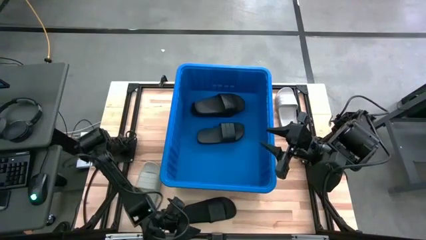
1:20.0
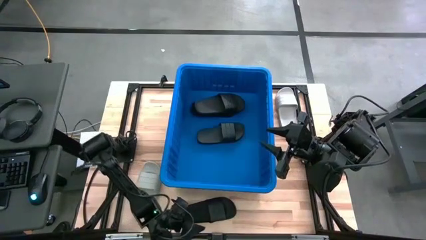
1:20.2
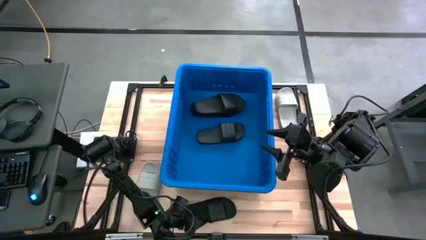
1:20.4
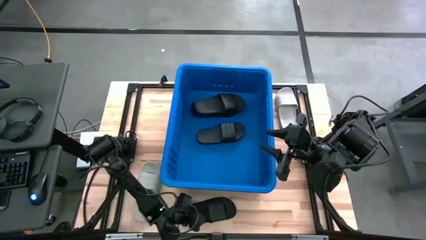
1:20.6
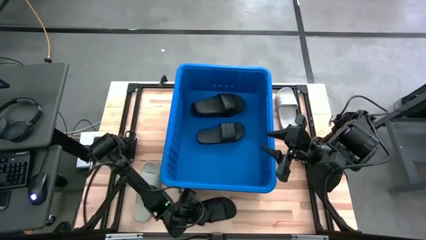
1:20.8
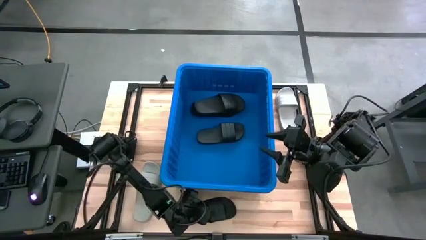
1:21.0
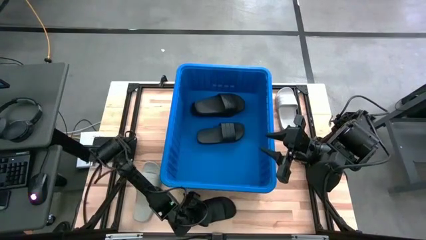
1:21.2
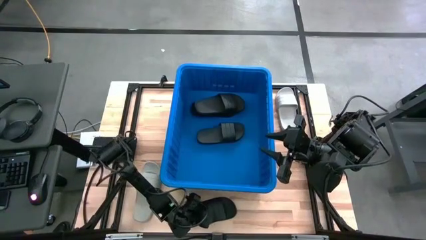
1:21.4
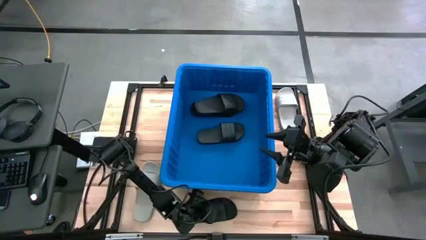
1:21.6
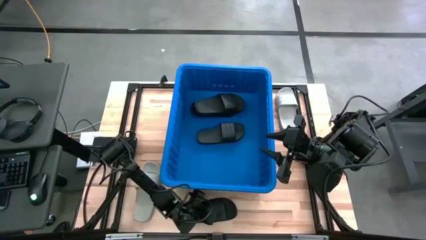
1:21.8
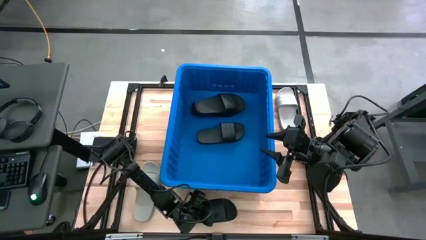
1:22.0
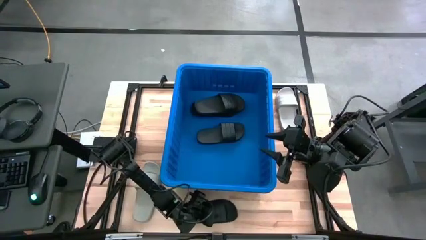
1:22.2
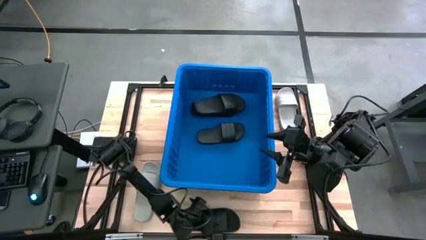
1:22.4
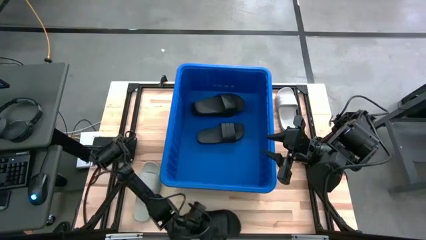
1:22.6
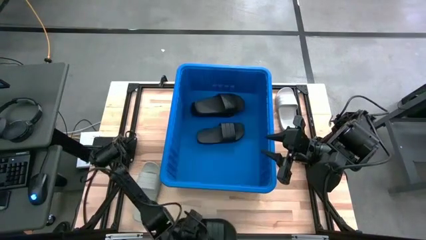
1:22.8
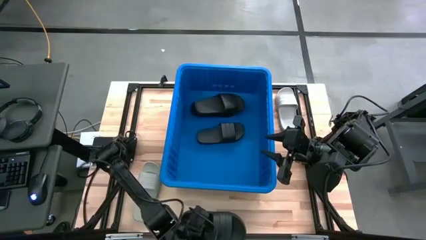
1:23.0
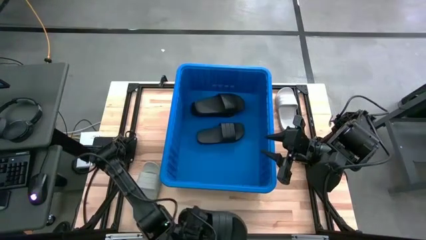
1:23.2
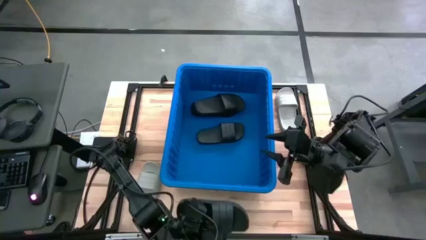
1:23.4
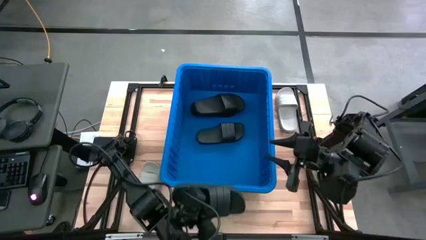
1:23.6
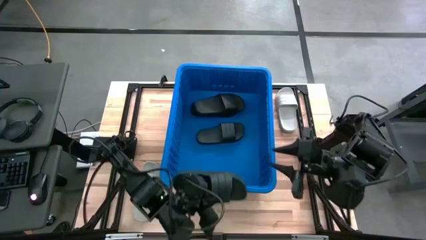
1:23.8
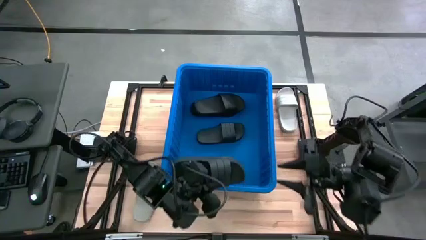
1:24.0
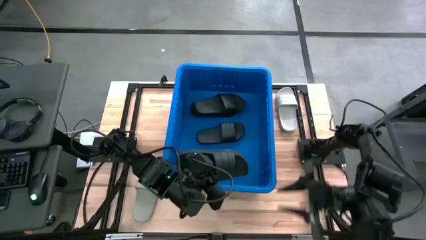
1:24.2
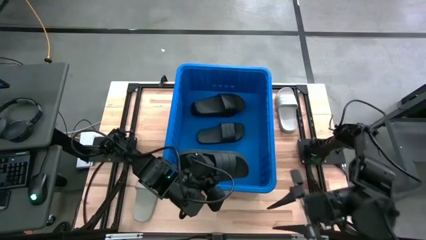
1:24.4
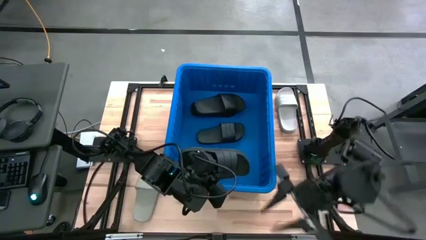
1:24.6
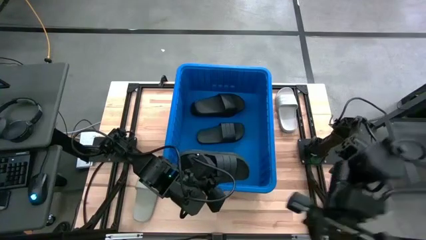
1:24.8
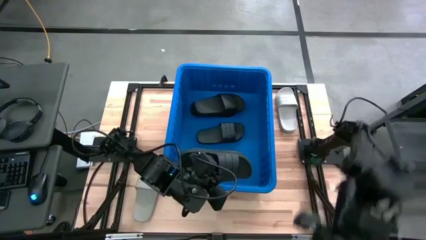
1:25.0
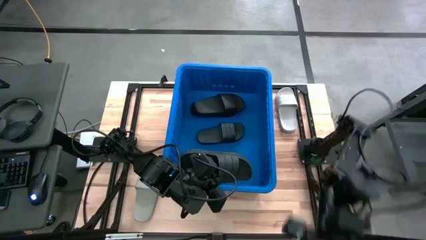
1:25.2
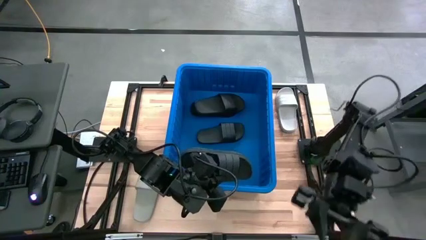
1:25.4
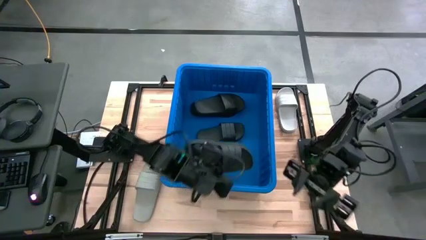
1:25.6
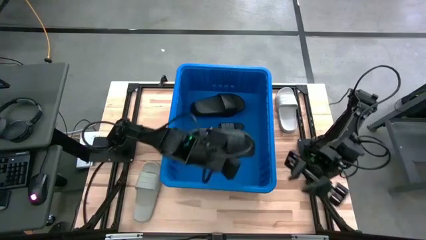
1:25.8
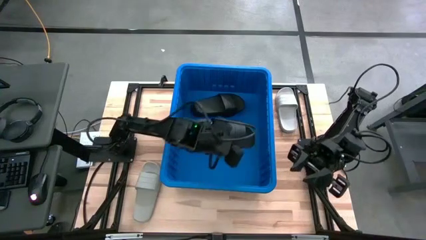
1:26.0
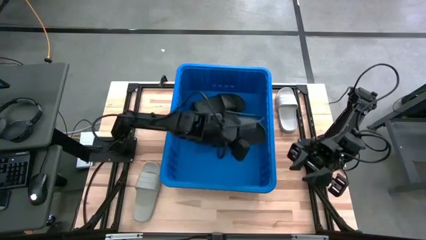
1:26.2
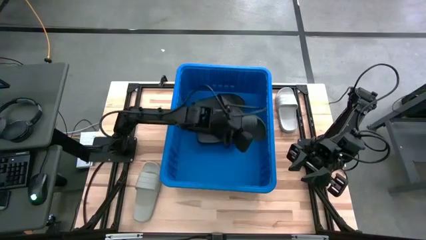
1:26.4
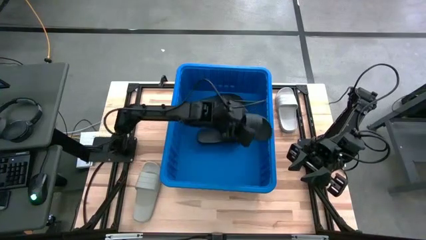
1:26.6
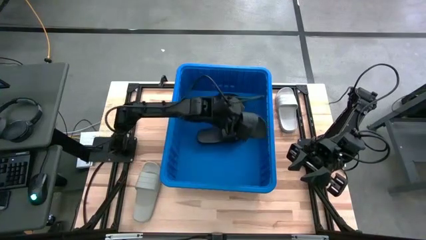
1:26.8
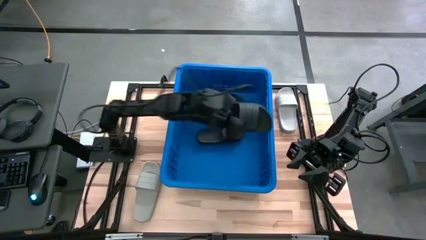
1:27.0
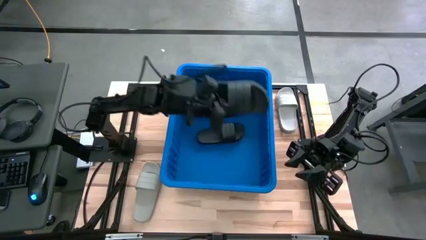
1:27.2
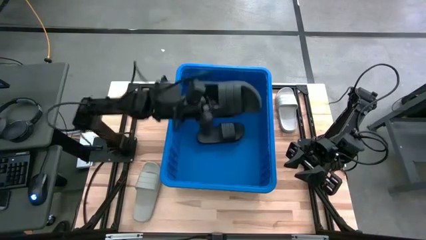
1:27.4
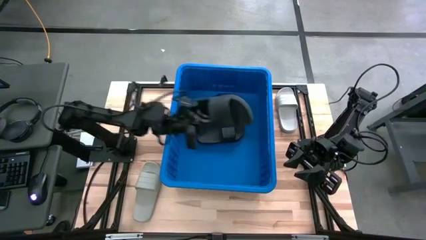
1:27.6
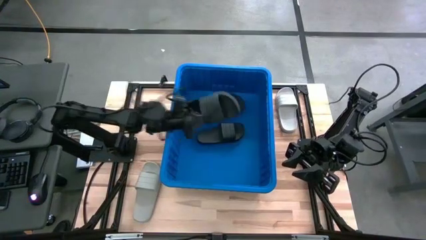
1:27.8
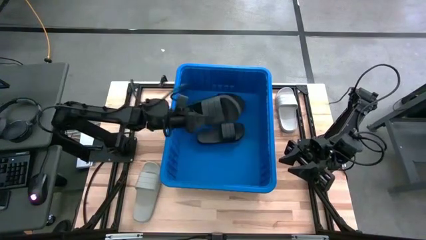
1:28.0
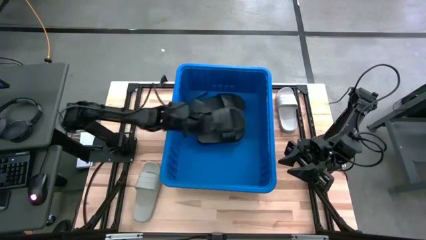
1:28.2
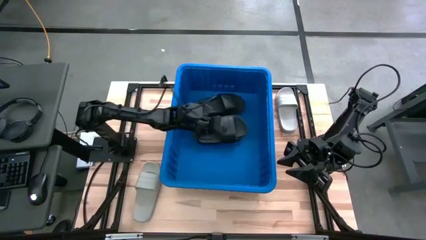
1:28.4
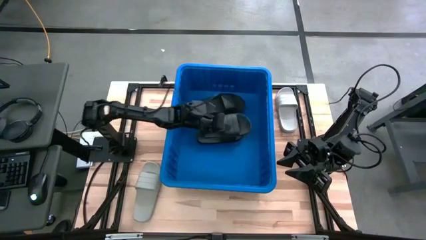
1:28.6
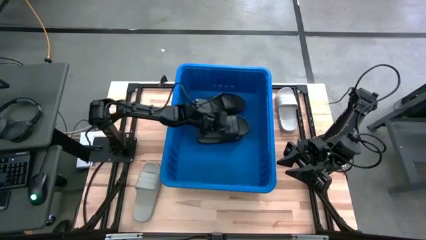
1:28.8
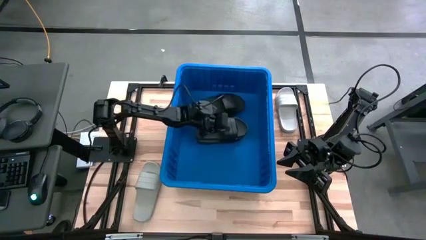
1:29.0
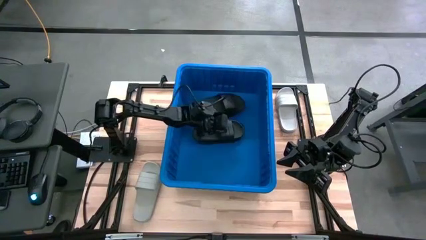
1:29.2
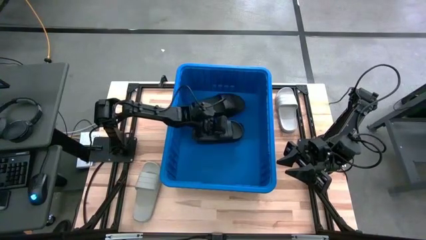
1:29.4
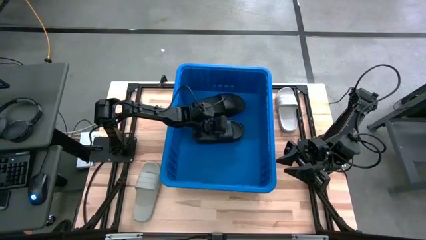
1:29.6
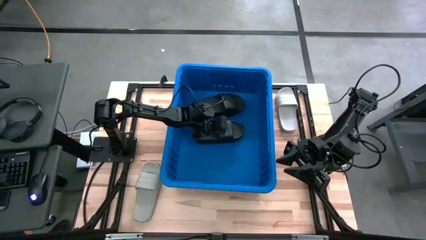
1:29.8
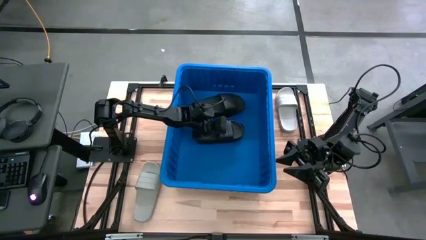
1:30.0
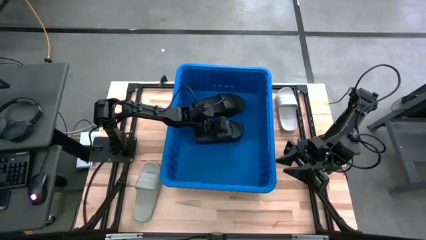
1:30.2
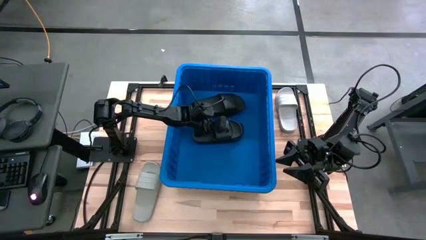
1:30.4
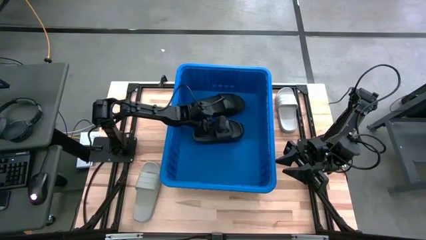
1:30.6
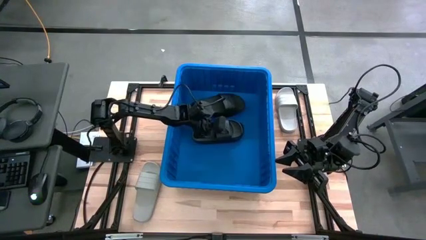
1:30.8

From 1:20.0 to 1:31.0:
Task: Pick and place slides into bin
Put the black slide into the blue container

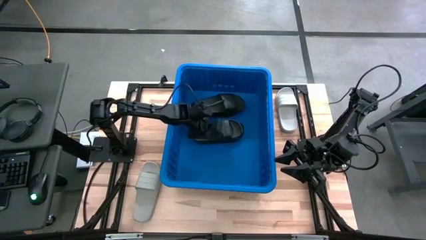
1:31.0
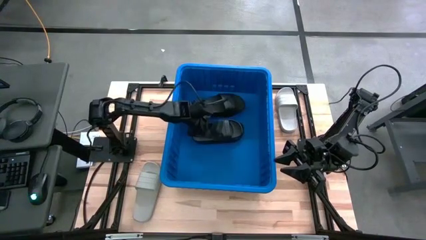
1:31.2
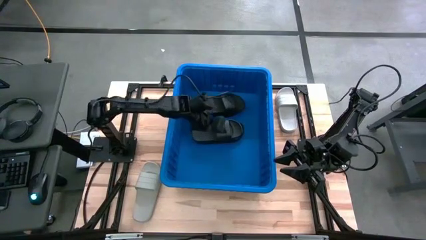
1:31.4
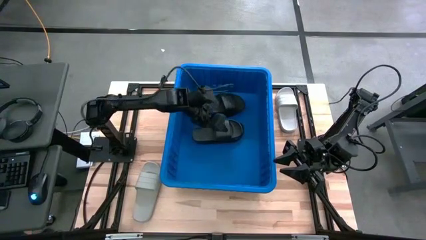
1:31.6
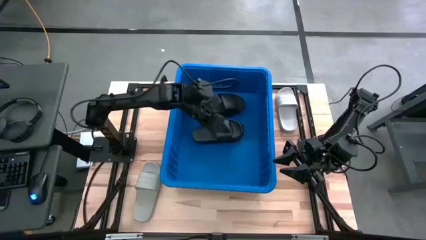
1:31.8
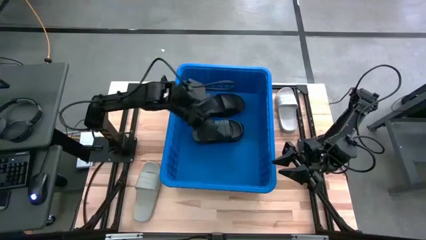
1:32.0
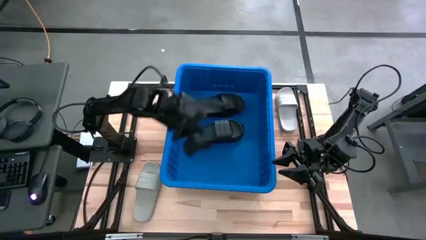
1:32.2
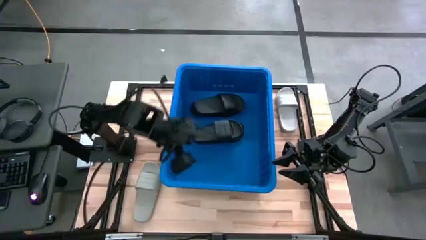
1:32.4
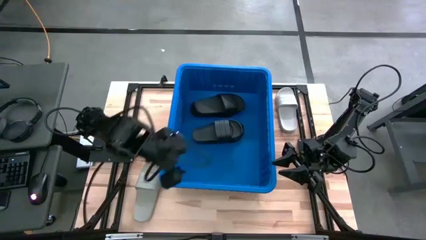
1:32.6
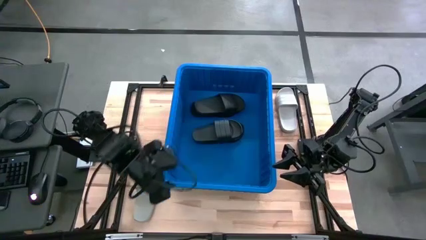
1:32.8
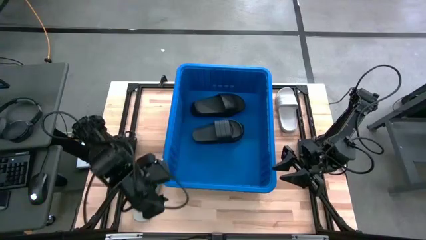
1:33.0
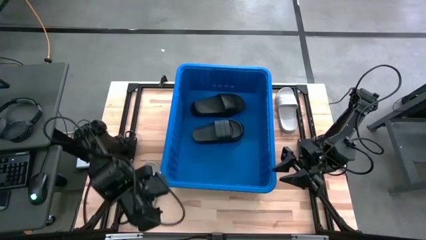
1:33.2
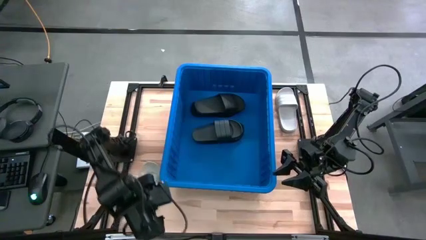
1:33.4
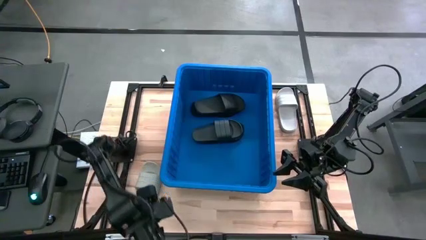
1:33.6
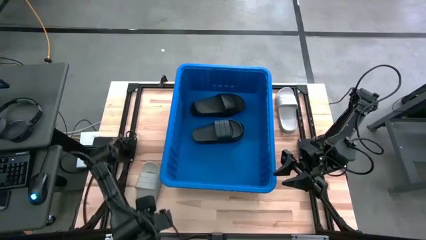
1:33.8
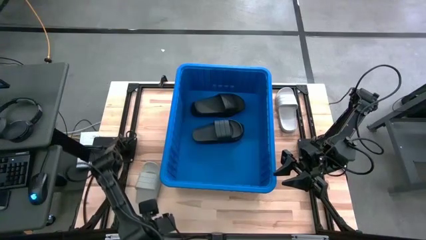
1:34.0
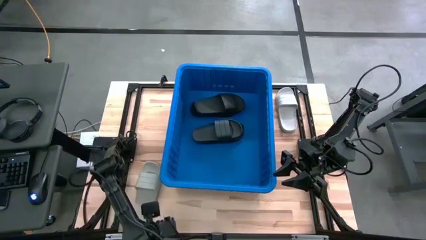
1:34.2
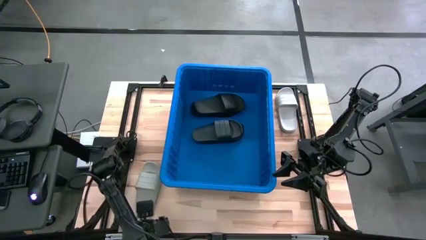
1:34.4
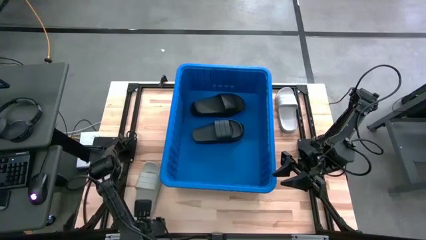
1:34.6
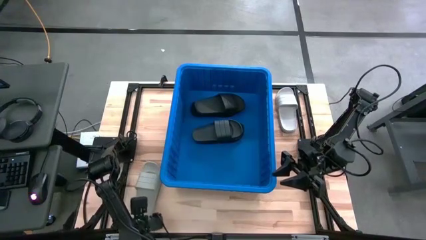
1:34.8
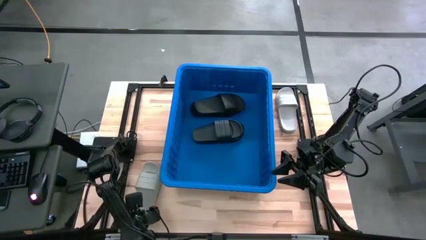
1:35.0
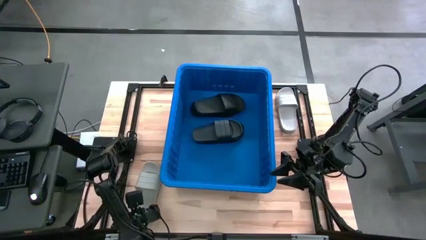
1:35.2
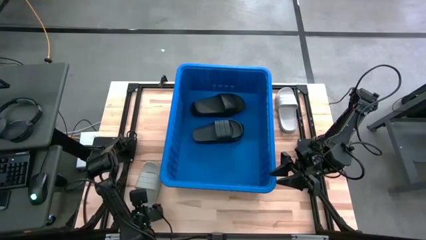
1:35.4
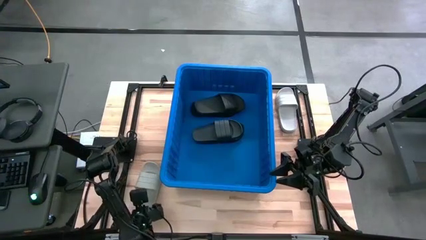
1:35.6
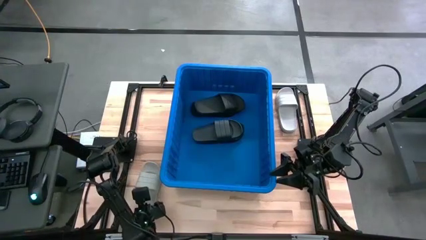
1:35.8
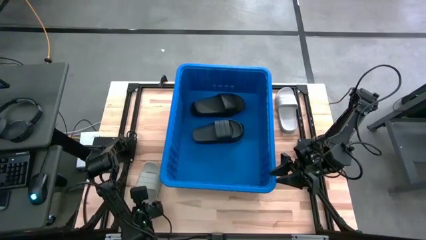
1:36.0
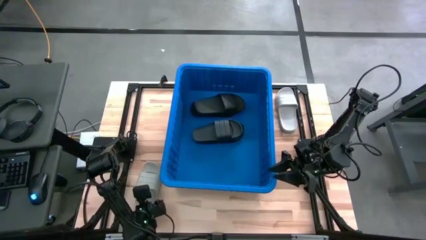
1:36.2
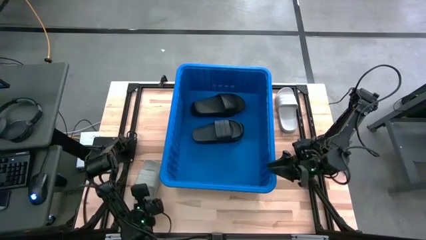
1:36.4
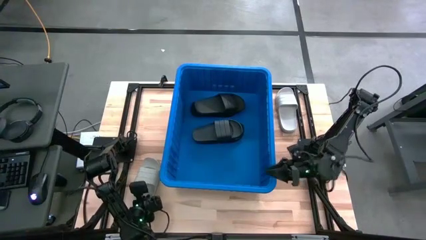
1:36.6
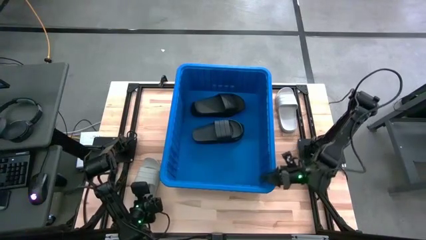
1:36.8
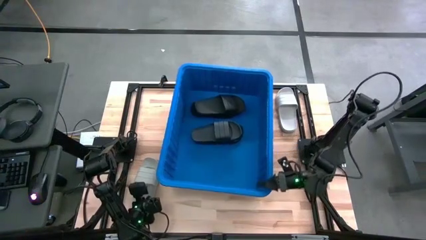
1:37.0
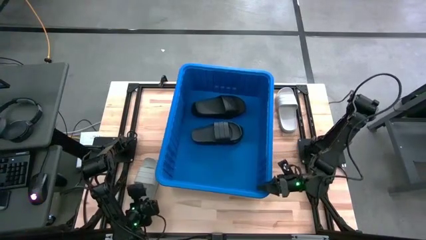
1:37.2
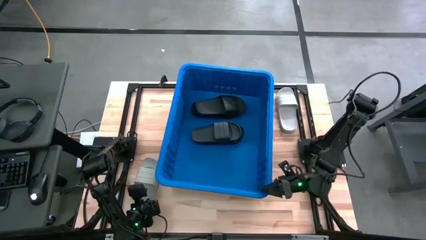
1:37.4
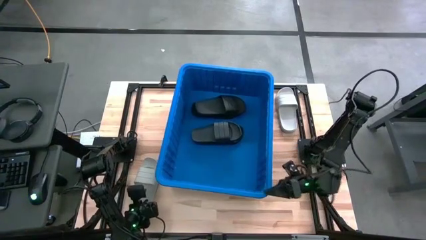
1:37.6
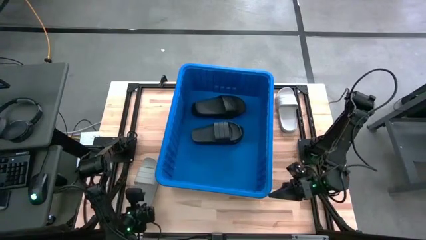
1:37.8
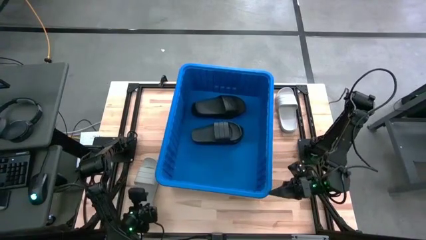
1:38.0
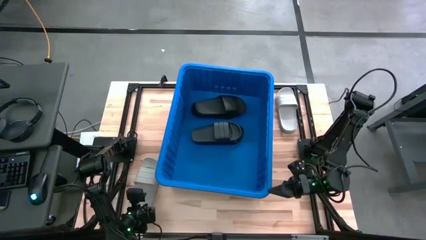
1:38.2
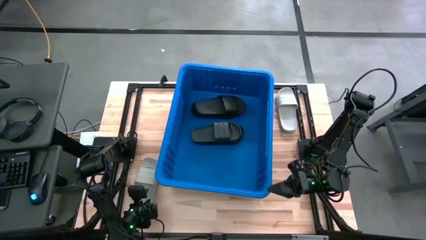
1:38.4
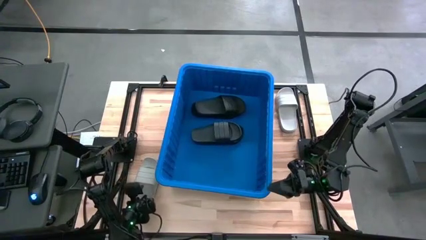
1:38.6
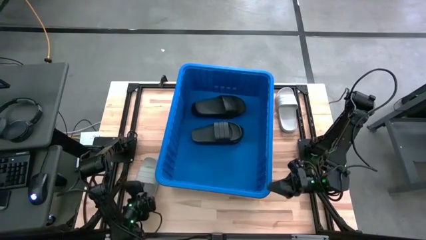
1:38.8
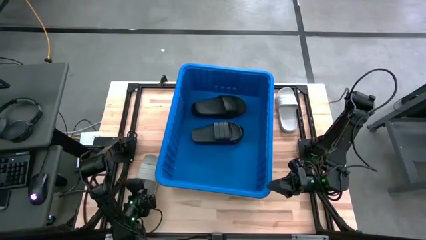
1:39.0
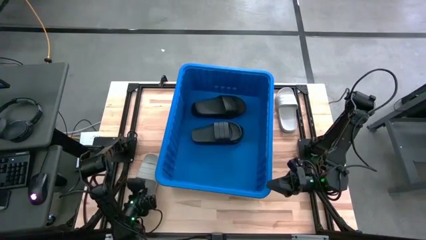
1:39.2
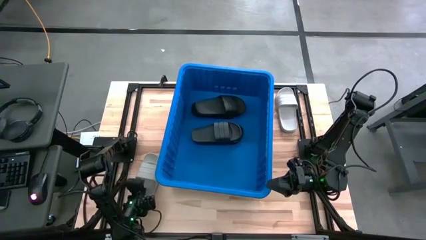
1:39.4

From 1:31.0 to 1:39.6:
Put the gray slide into the blue container
